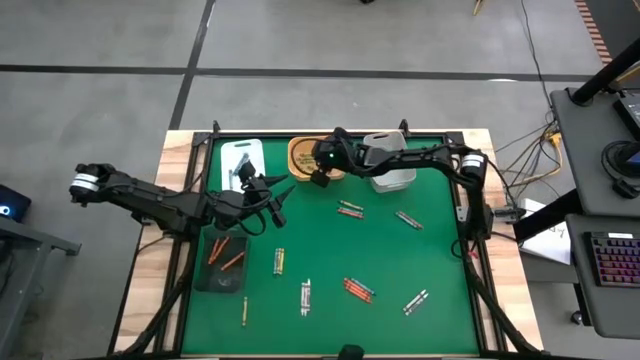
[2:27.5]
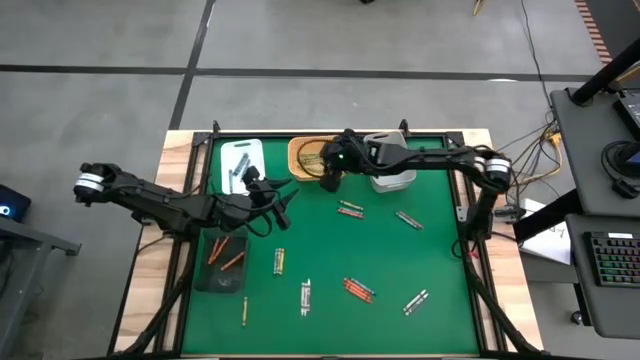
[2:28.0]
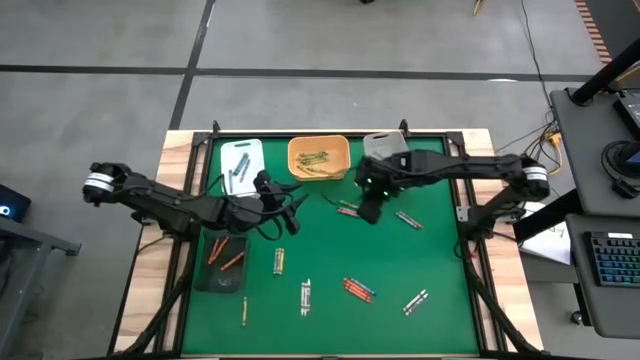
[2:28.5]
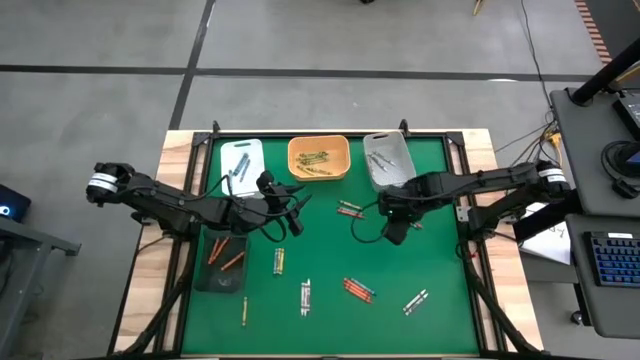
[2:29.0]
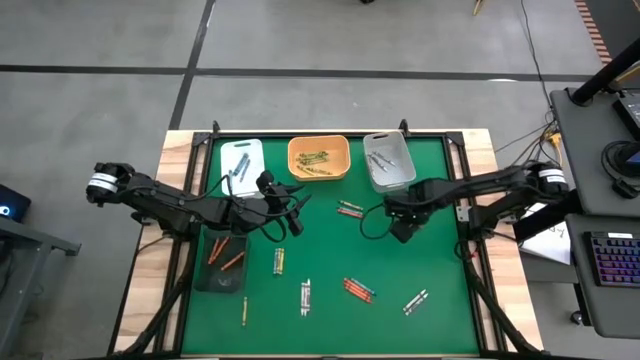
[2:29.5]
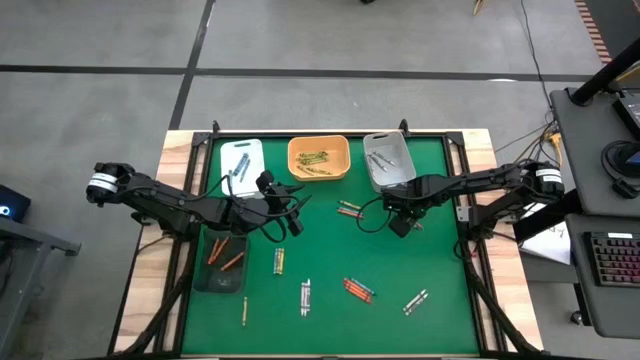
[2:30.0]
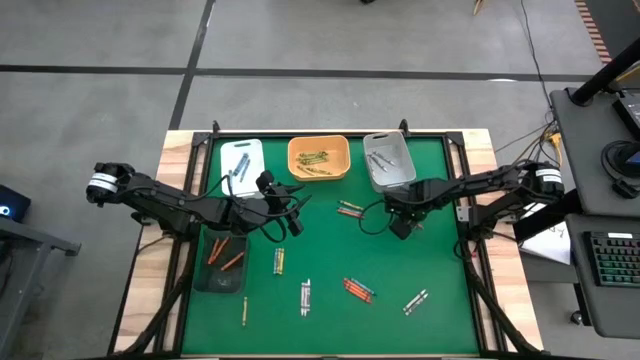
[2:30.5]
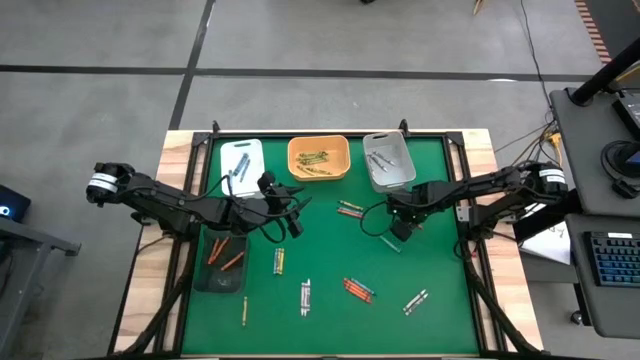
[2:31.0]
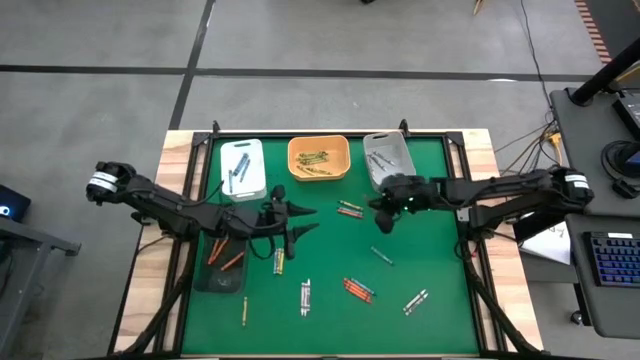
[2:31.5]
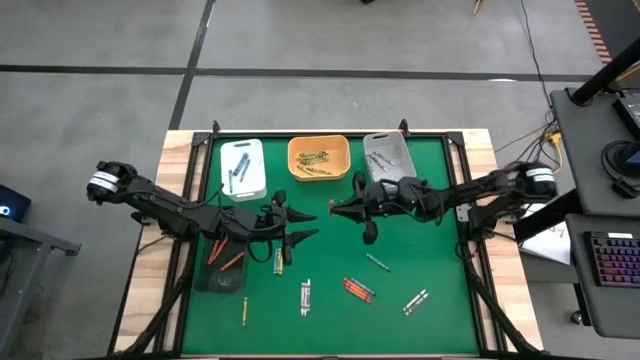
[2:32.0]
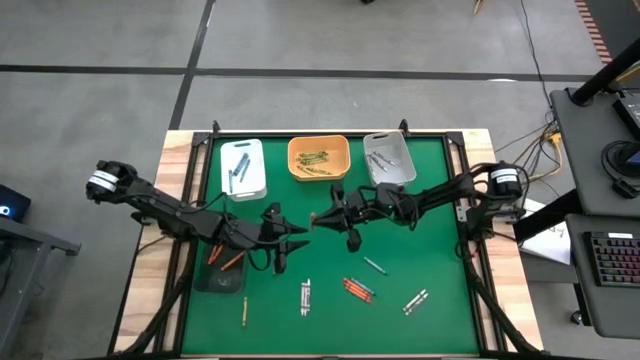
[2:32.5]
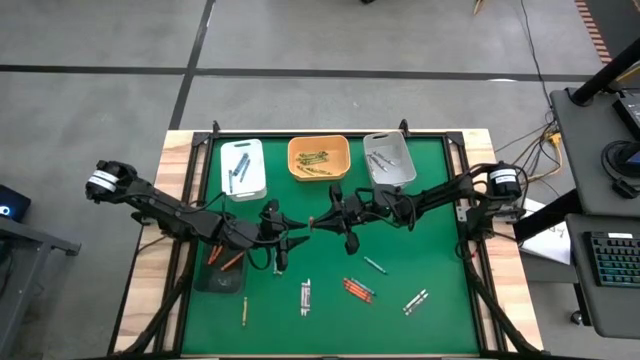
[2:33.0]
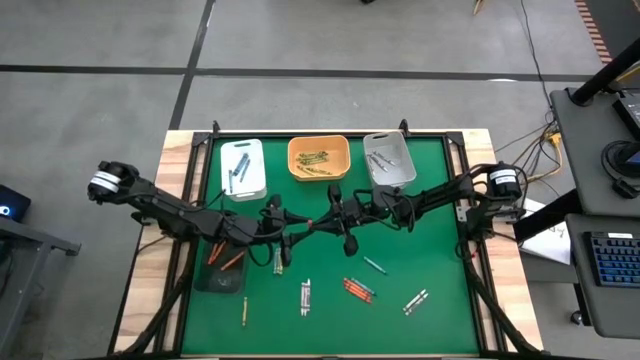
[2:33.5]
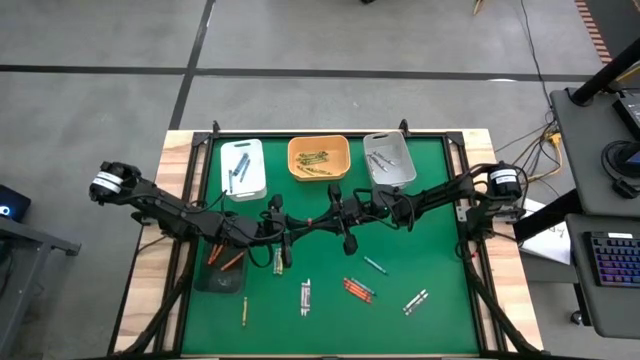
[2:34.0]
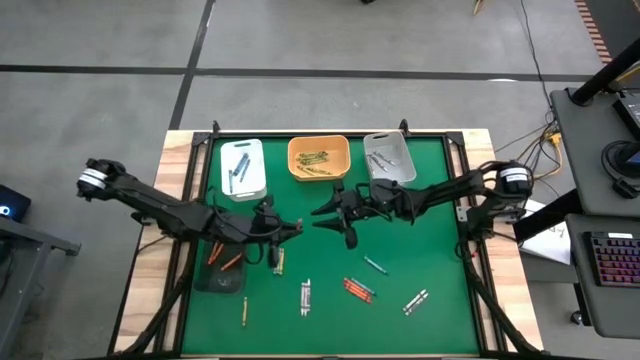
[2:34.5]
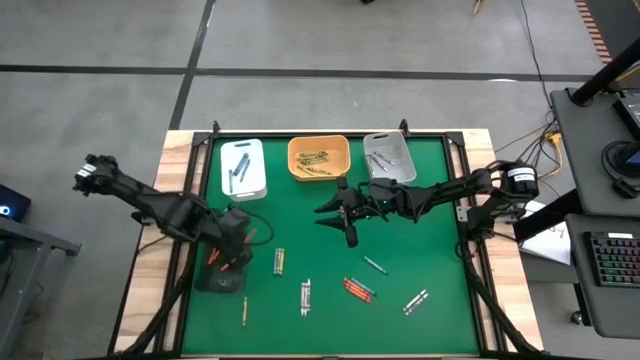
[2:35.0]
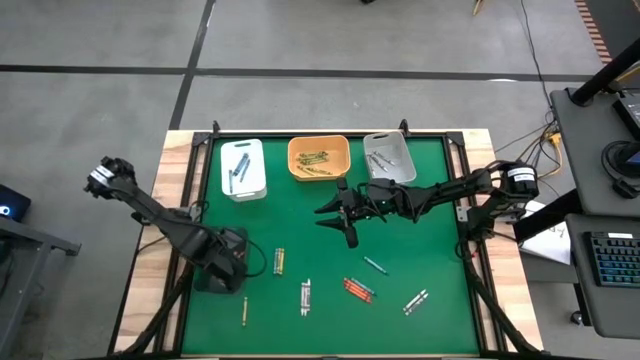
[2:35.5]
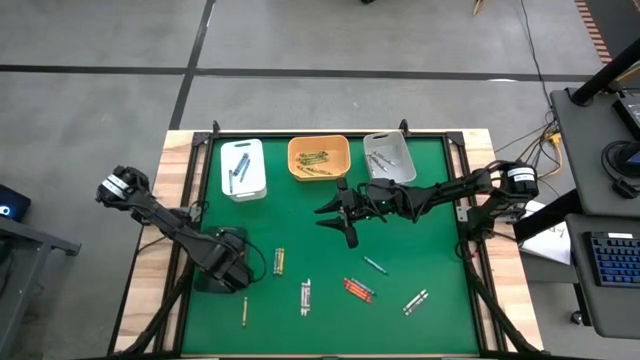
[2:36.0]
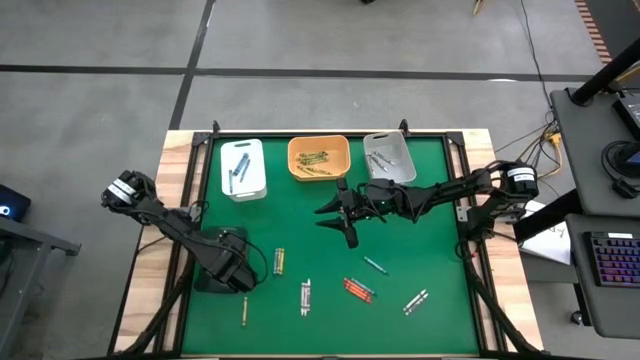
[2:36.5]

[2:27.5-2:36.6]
Task: Sort crayons
Put the orange crayon into the black bin

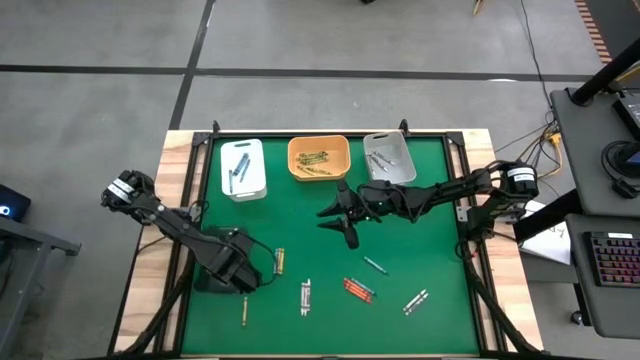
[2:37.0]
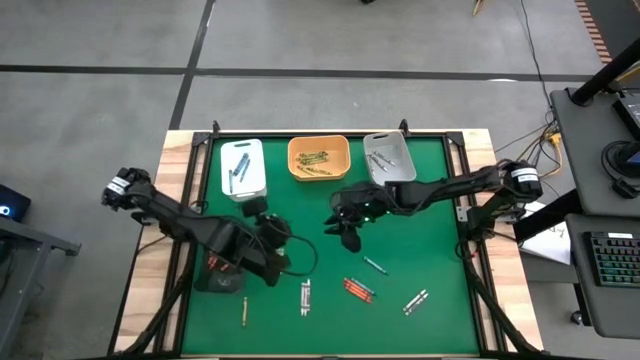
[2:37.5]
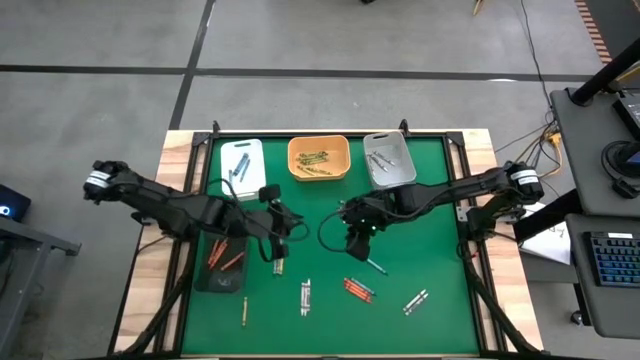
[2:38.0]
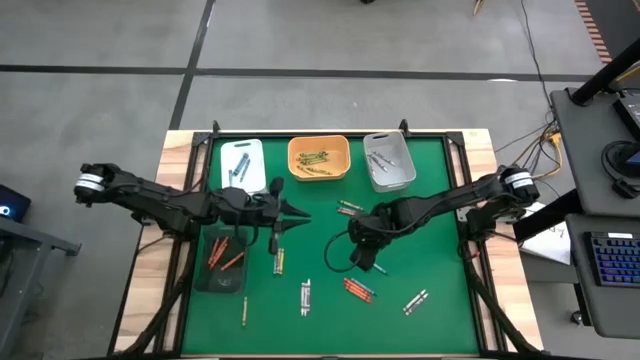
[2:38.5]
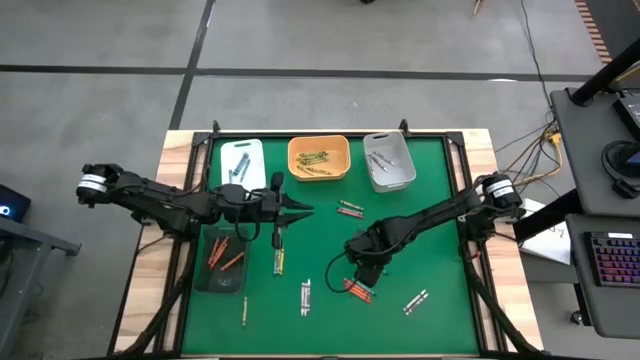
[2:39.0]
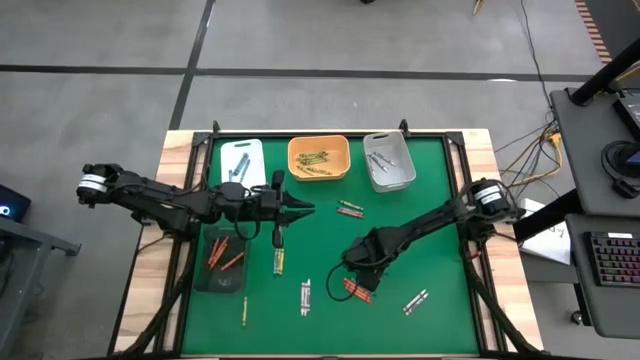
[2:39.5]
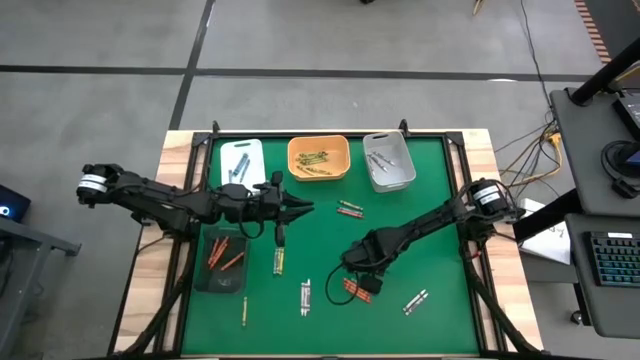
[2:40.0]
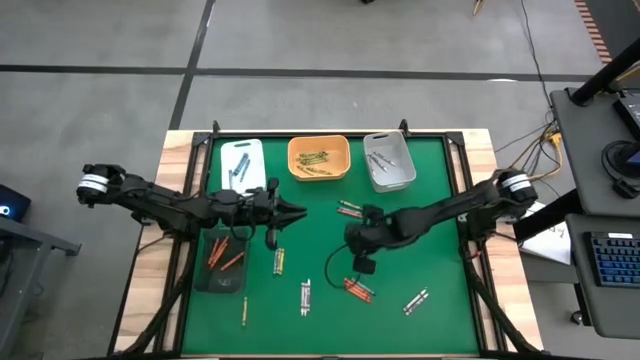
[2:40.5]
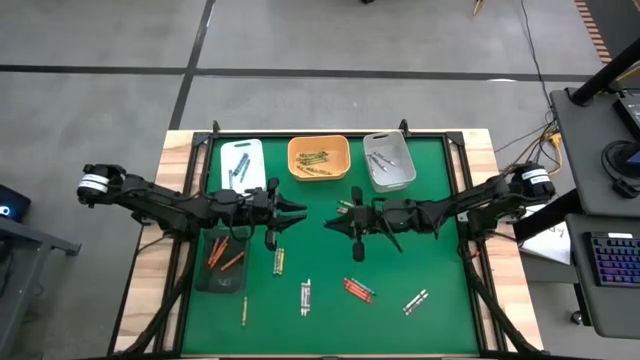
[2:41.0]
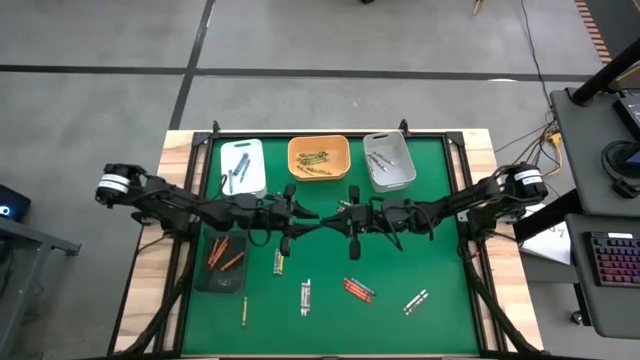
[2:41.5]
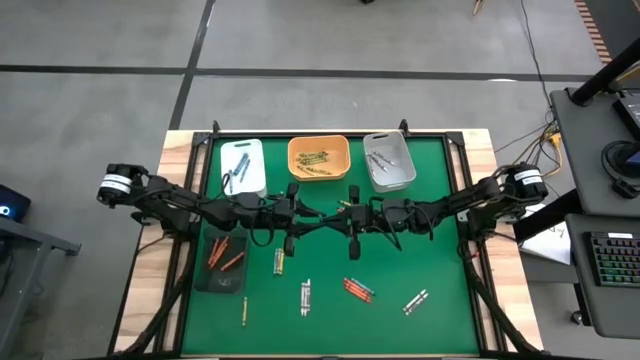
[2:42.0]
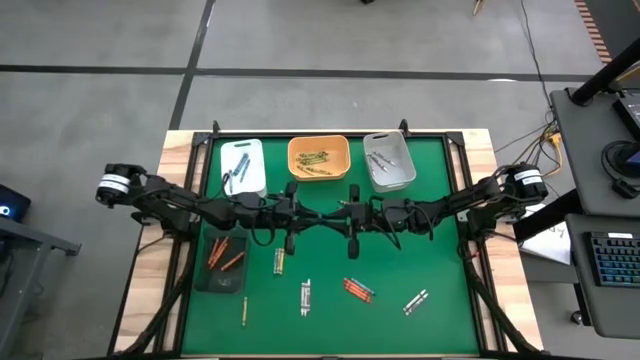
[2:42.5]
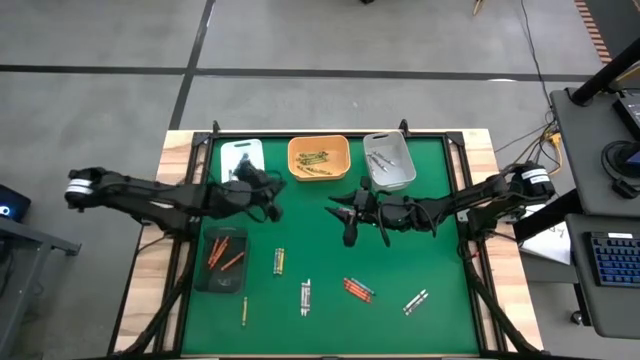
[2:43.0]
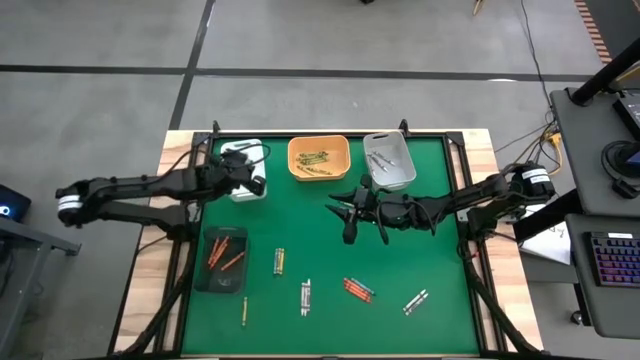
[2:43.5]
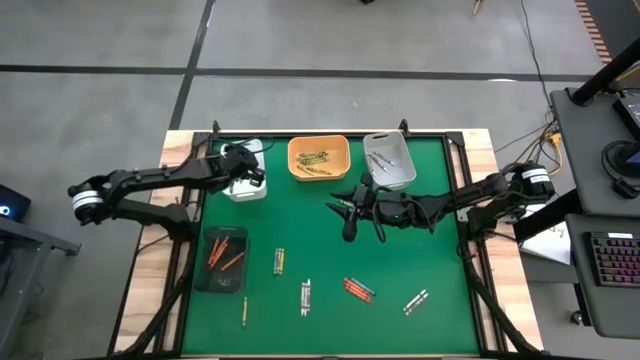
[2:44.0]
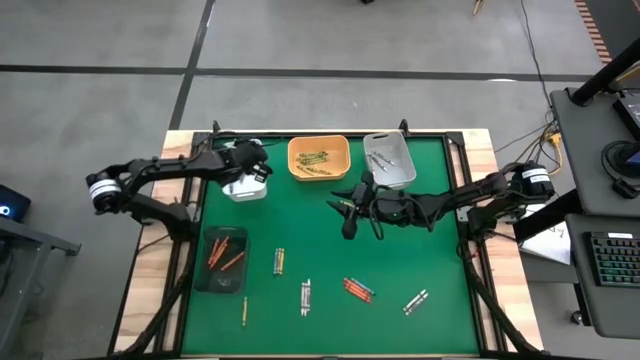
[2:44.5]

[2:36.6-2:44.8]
Put the blue crayon into the white bin

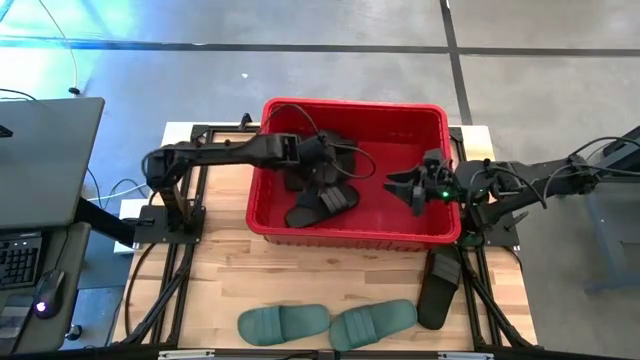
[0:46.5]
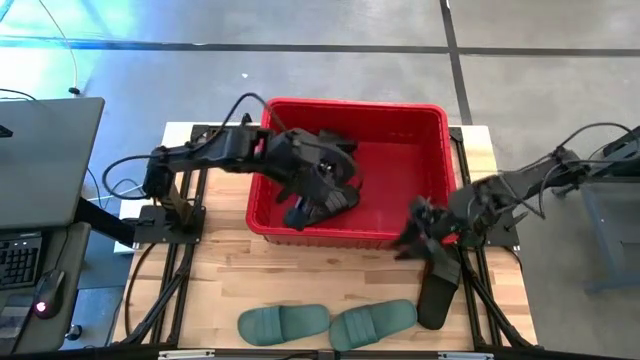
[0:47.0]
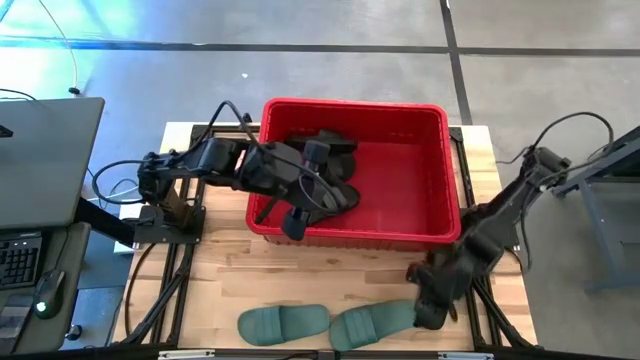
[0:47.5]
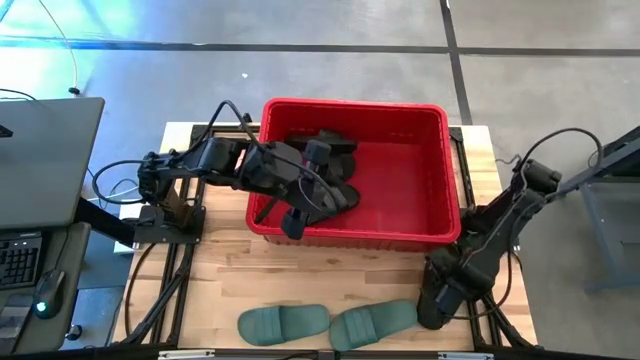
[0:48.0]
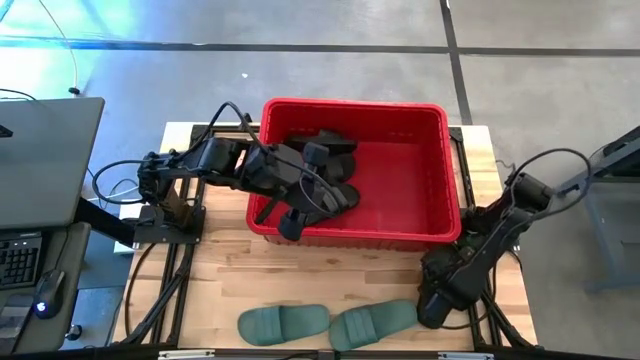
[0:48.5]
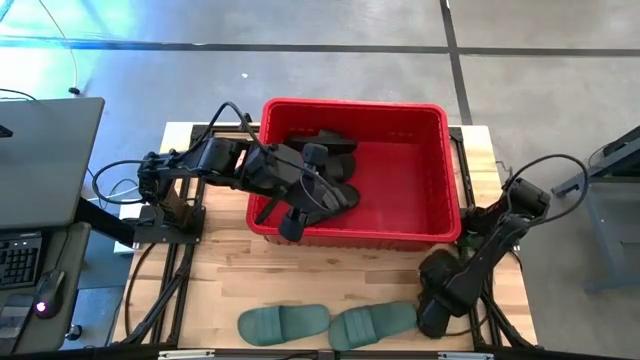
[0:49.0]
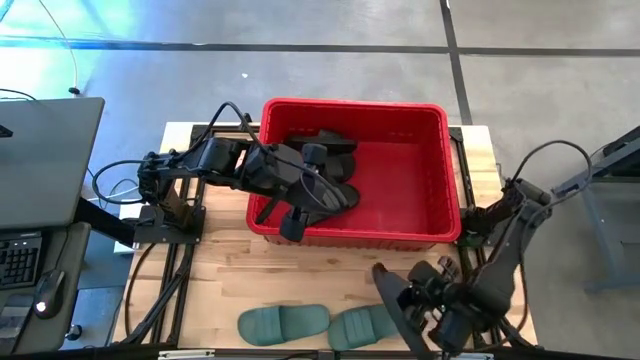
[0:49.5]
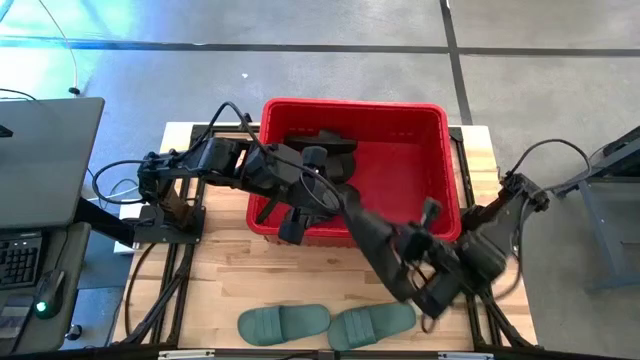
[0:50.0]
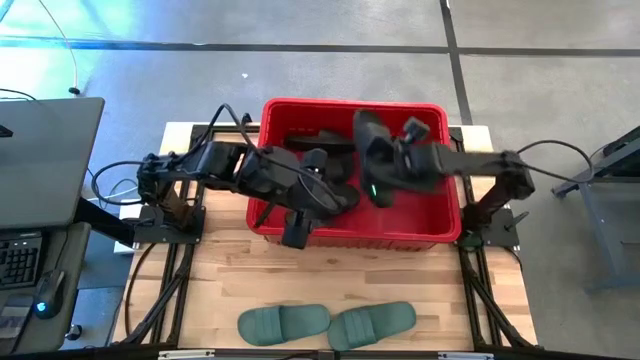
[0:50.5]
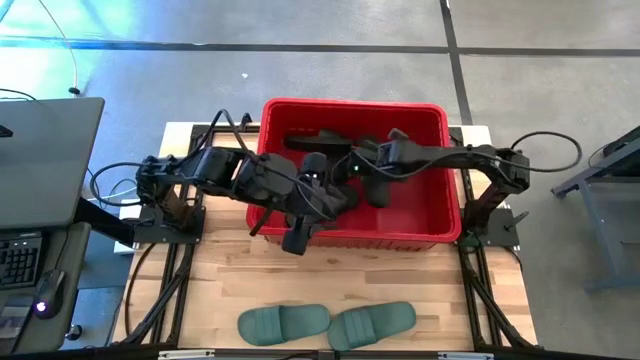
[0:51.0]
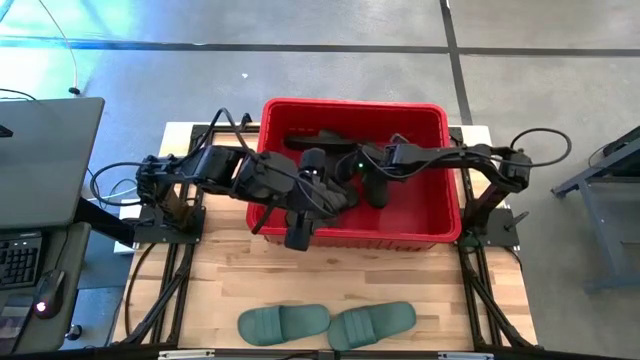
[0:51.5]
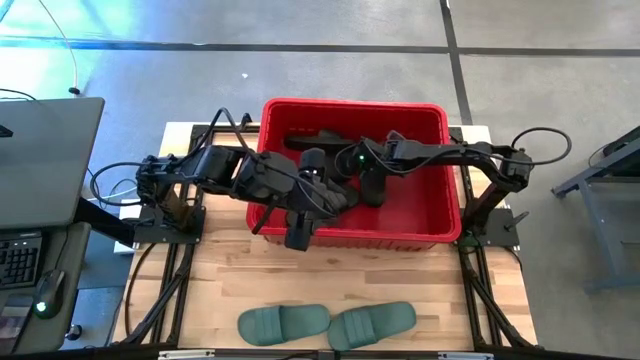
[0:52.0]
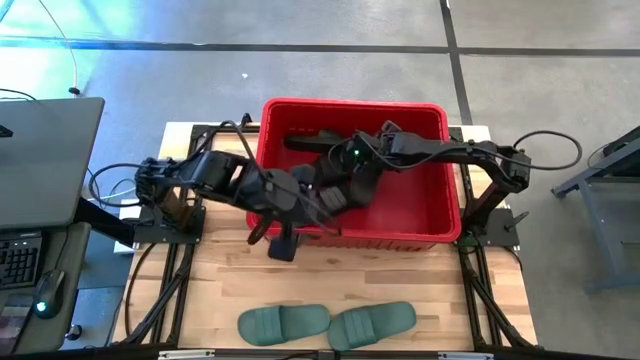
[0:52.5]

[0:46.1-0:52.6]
Task: Pick and place slides into bin
Put the black slide into the red bin
